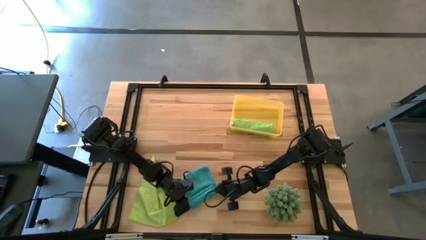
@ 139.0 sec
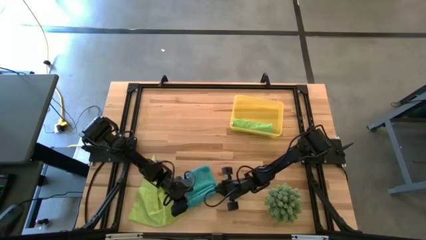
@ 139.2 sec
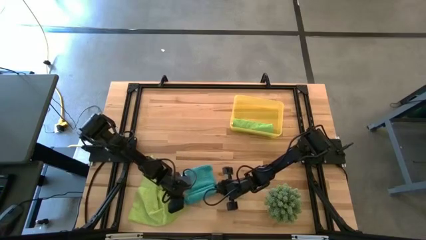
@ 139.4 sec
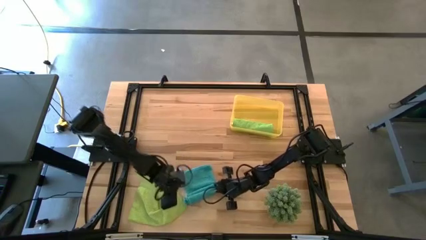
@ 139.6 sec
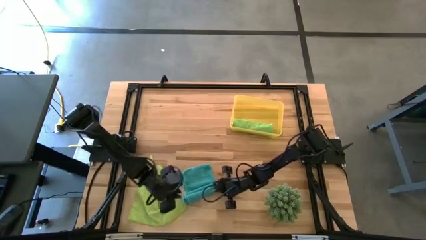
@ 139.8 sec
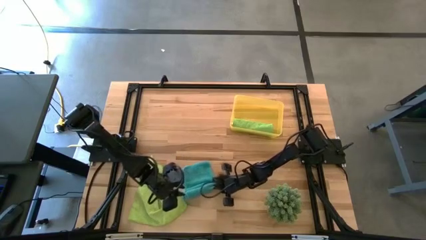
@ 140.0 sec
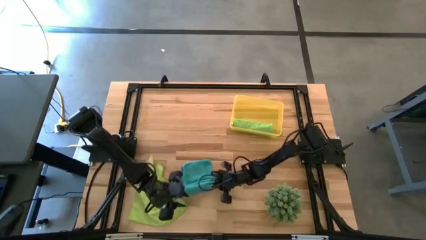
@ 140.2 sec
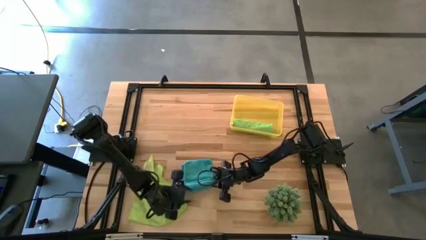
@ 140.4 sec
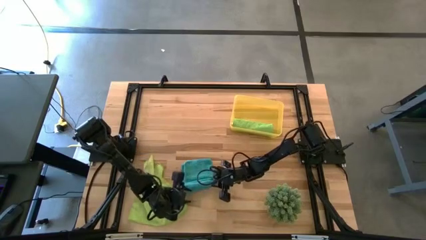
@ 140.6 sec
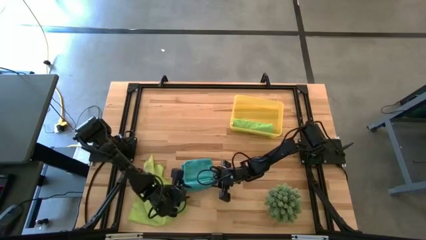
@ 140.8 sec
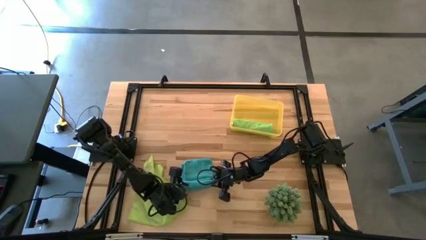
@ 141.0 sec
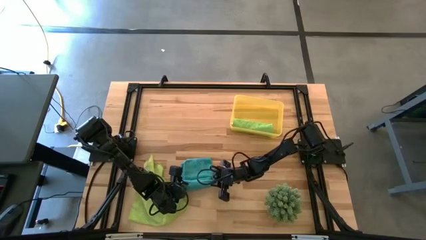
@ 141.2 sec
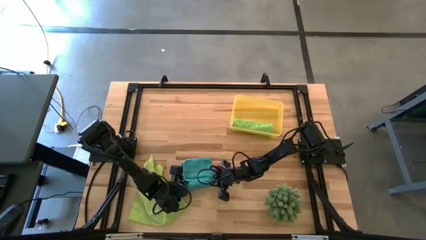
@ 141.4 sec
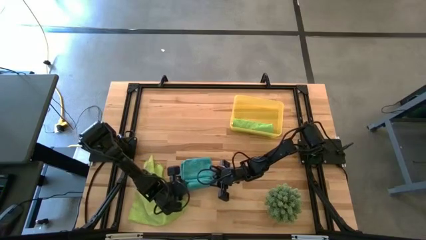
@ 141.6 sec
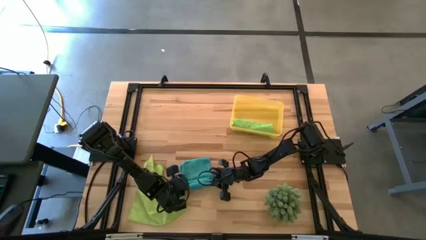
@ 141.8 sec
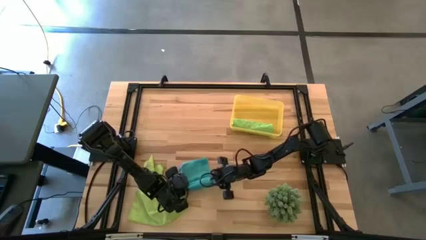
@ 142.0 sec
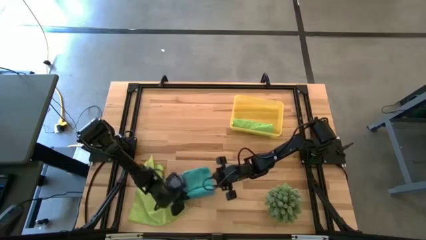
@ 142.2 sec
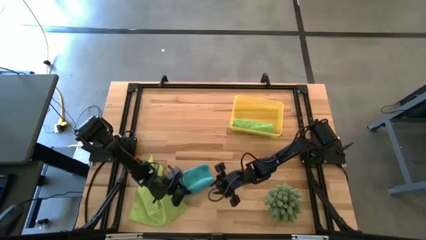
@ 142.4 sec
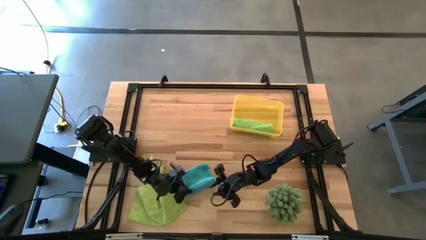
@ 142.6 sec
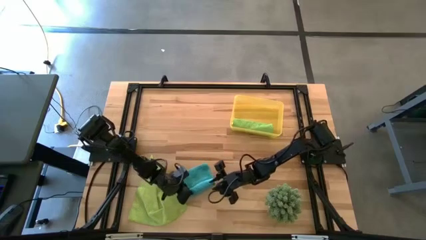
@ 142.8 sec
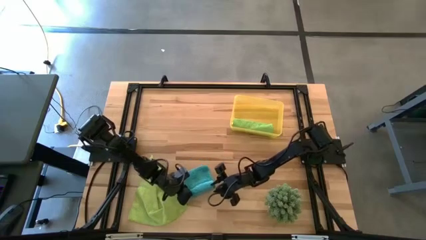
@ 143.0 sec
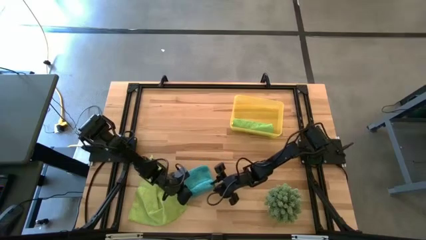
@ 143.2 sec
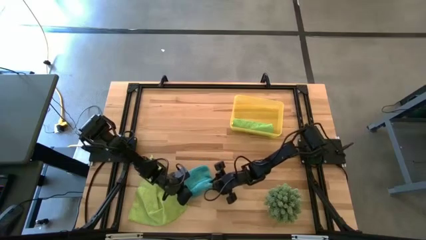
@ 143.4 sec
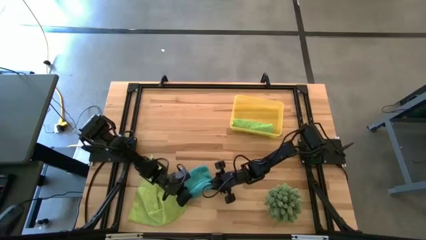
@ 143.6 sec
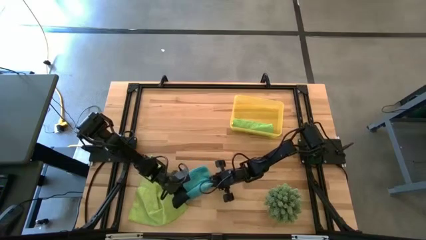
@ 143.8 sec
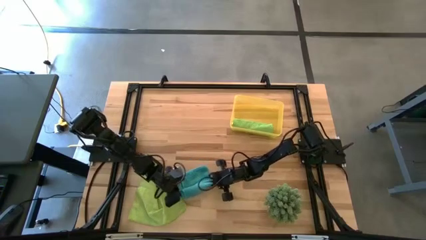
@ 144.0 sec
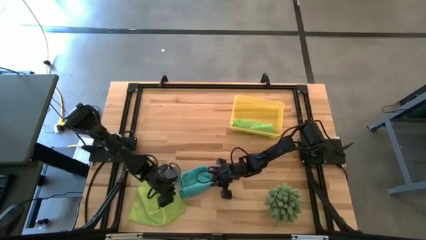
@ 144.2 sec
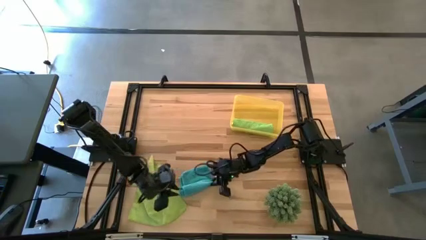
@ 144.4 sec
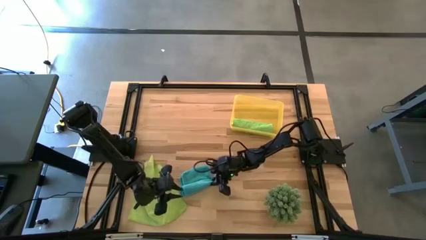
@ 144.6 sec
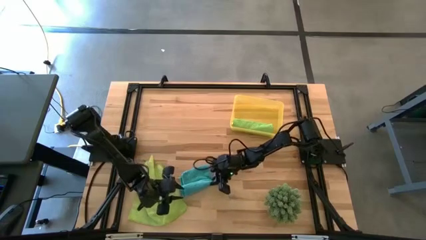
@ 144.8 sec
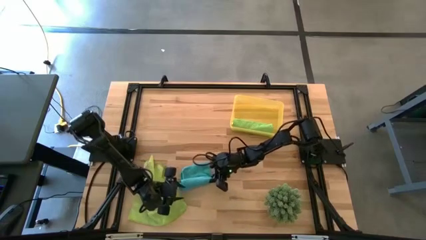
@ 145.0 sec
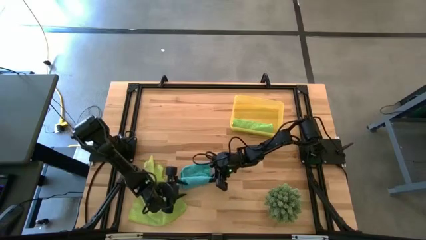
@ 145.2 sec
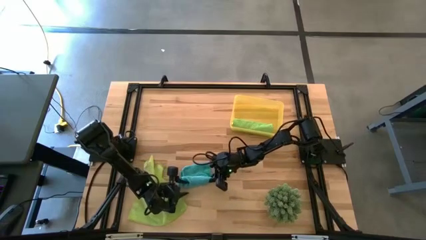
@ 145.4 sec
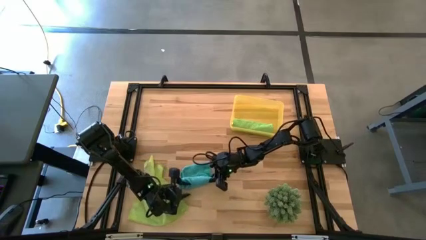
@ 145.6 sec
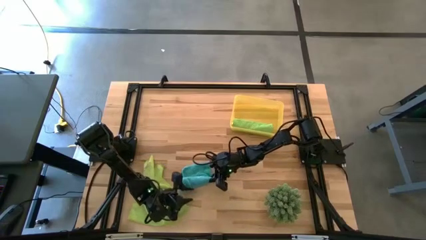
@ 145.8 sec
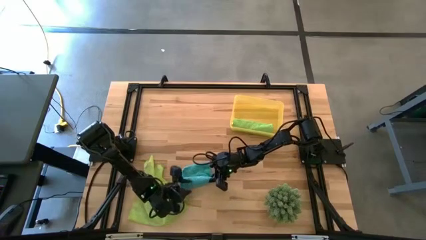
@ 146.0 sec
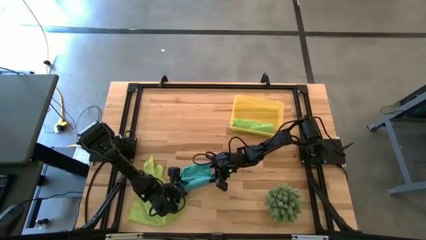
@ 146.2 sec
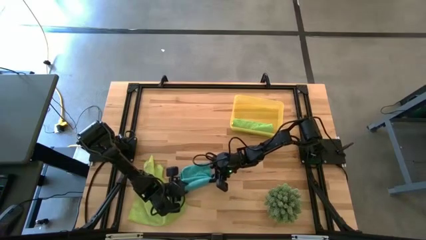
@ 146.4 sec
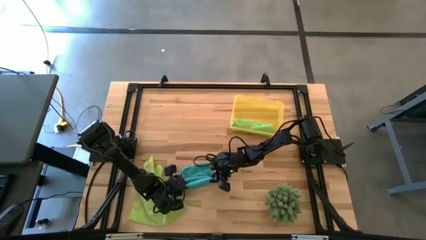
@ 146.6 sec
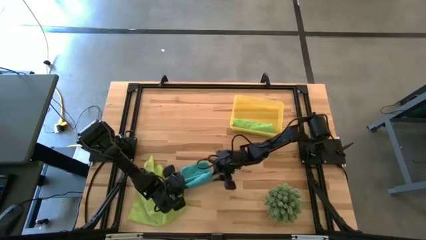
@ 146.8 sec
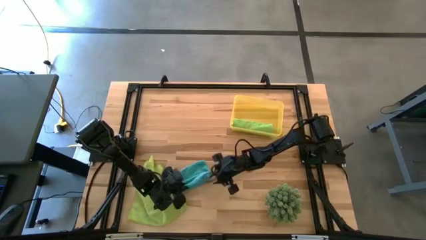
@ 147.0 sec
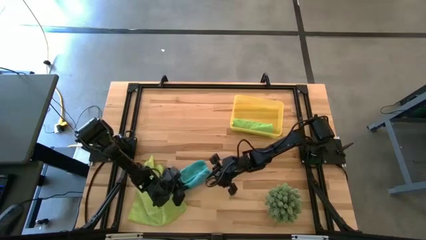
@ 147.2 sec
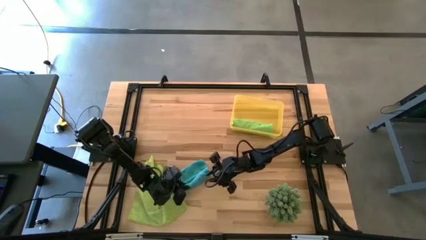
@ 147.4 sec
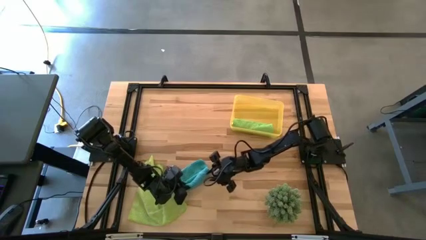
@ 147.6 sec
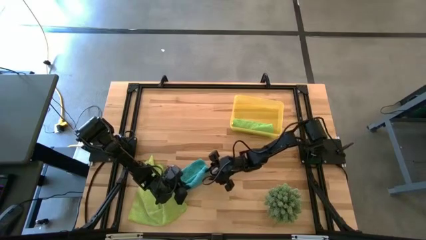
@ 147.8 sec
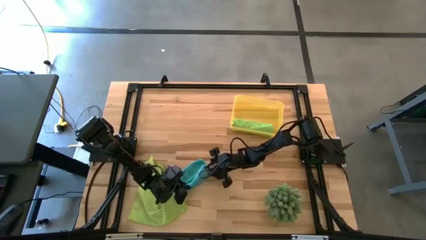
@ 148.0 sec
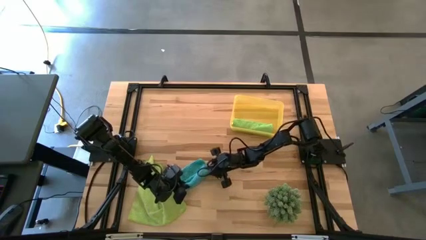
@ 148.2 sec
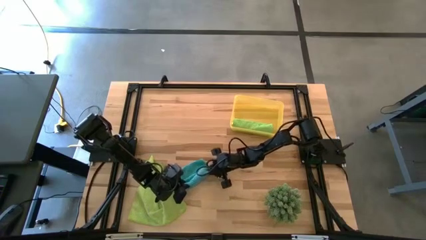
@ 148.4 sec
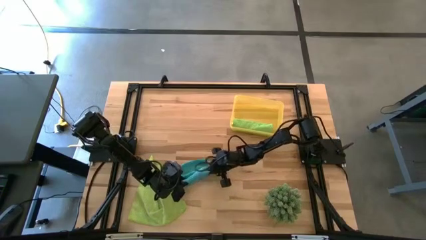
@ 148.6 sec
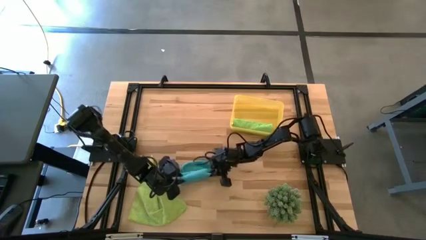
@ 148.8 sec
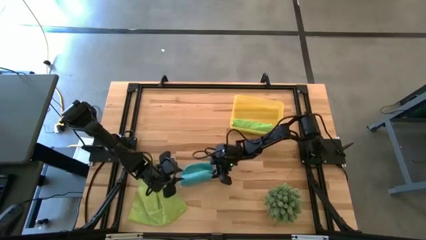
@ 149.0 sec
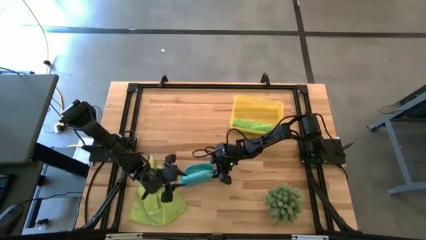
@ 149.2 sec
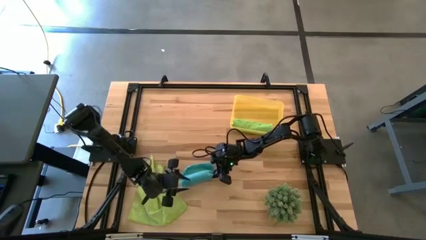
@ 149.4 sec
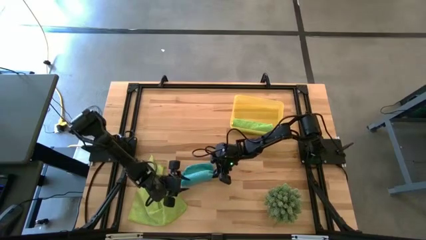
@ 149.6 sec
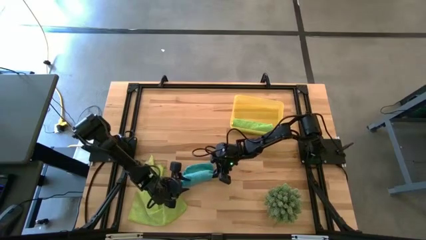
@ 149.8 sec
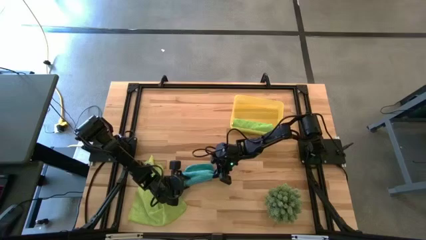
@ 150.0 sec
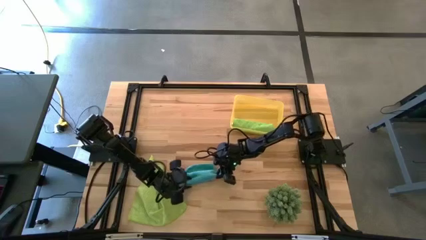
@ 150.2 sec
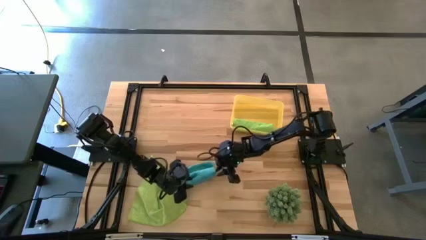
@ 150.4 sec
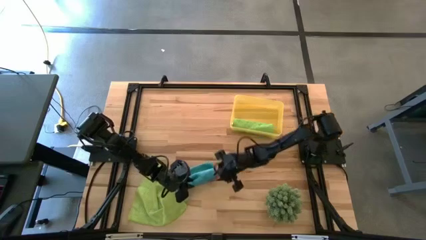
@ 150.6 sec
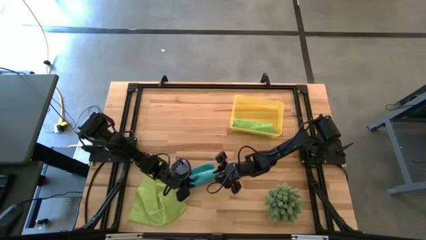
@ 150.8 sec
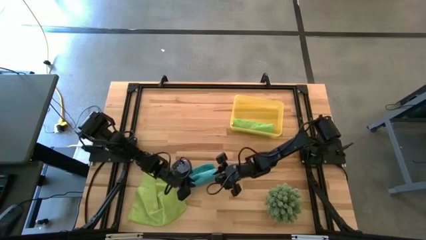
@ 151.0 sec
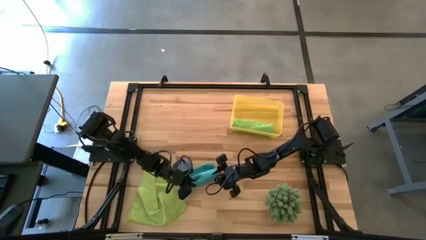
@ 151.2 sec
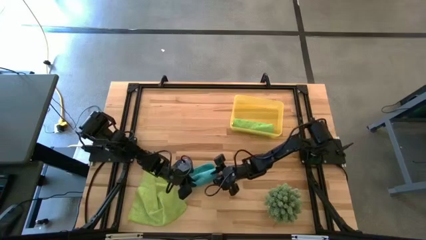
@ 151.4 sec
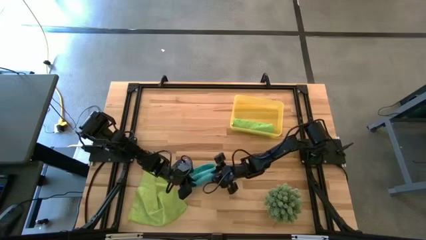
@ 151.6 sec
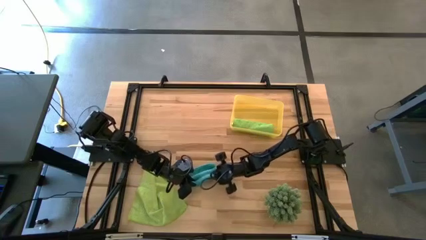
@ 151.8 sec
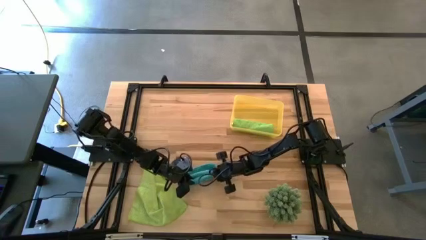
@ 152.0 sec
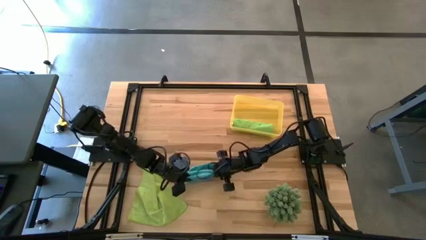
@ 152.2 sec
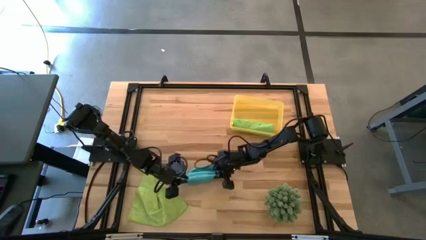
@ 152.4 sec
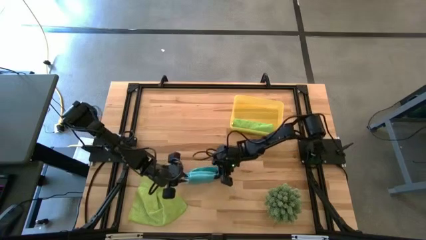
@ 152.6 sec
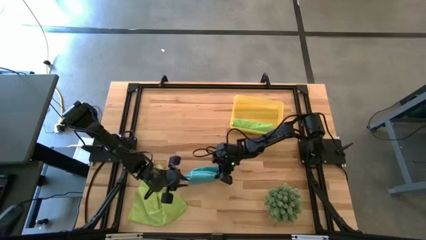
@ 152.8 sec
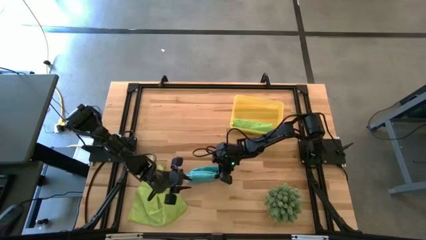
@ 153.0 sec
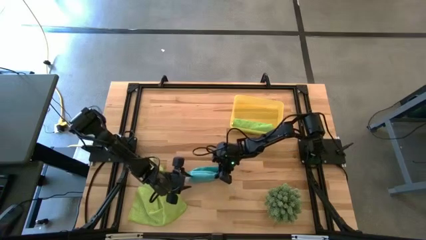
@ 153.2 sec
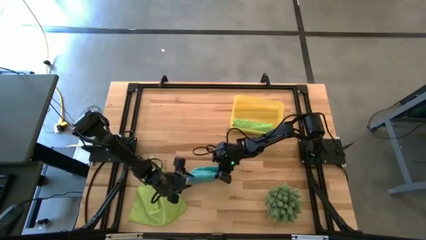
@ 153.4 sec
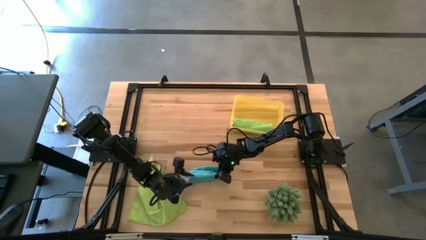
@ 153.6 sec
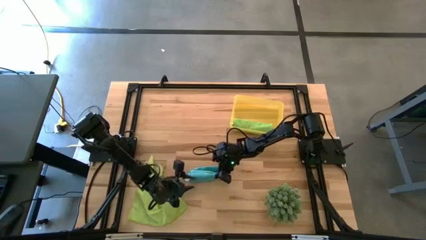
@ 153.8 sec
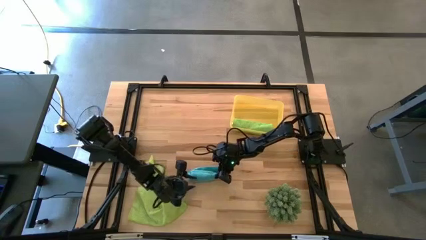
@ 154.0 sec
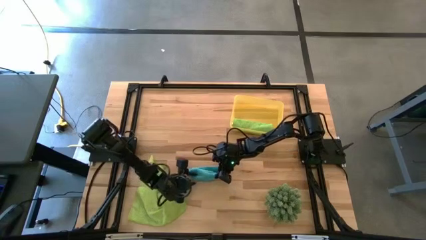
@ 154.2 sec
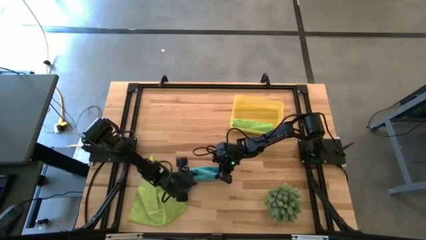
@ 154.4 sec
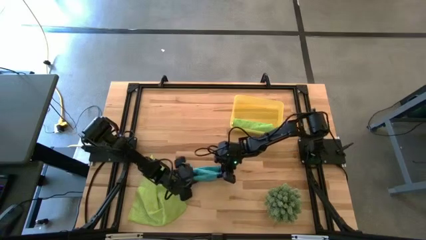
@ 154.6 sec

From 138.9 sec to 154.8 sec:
Task: Roll microfiber towels into tight, uniform cylinder then place into a basket
Roll the blue microfiber towel

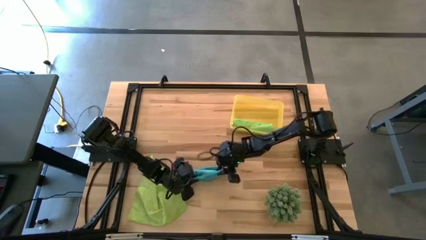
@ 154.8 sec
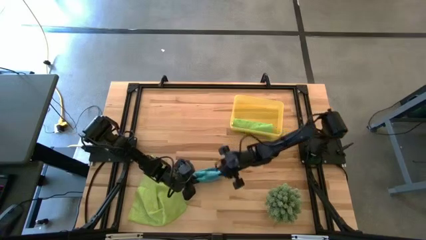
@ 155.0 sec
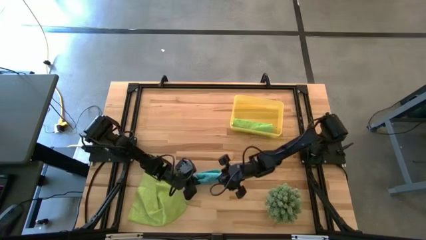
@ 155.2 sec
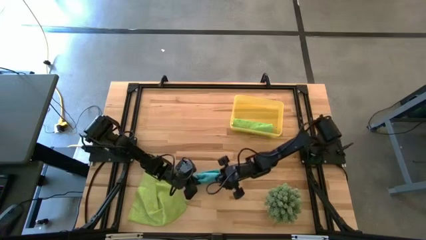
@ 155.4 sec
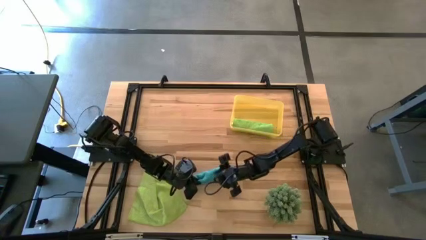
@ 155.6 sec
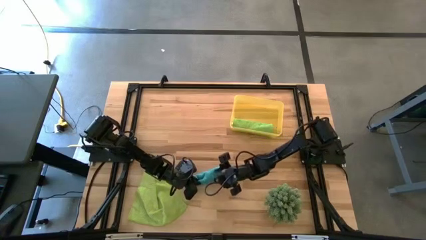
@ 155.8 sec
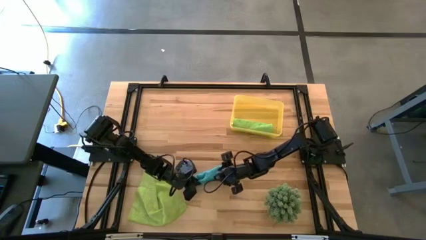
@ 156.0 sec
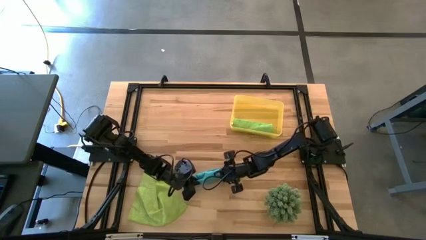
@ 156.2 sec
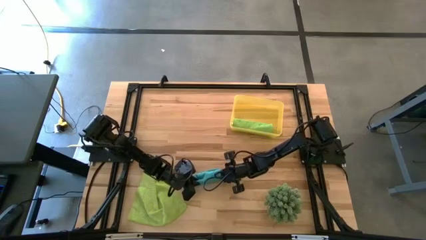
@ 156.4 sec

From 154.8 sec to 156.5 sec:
Roll the blue microfiber towel
